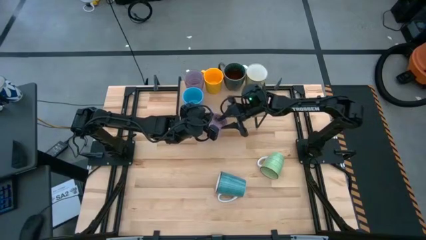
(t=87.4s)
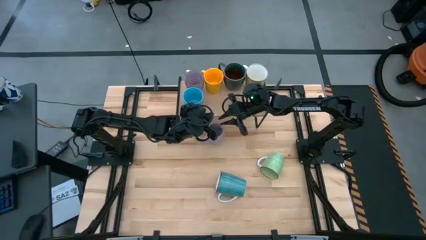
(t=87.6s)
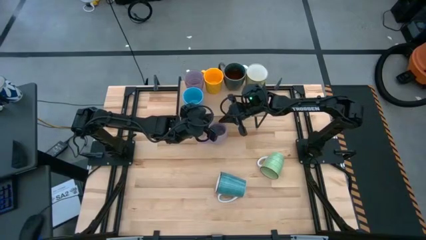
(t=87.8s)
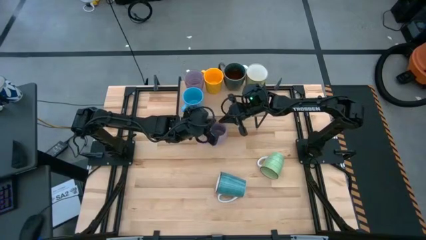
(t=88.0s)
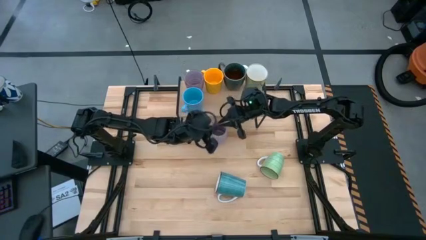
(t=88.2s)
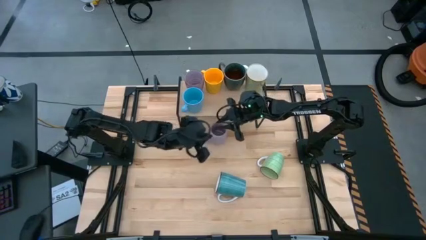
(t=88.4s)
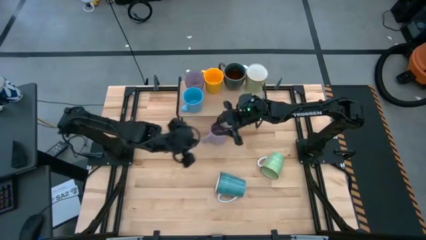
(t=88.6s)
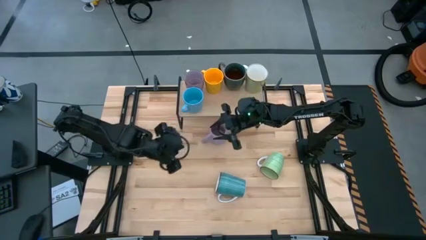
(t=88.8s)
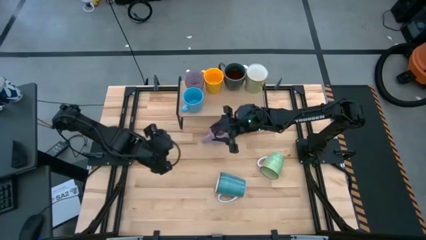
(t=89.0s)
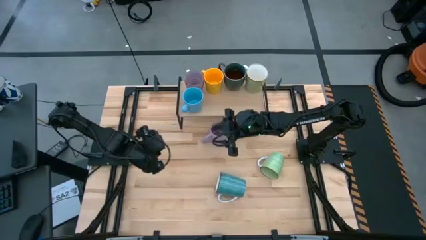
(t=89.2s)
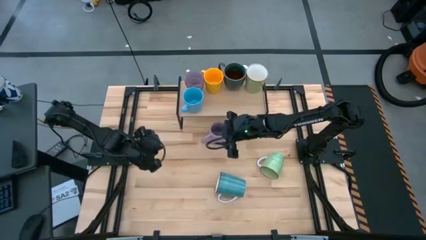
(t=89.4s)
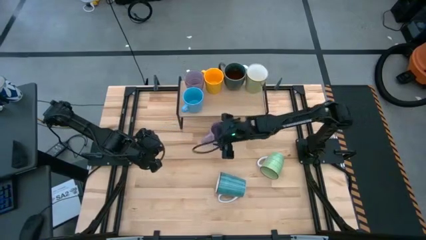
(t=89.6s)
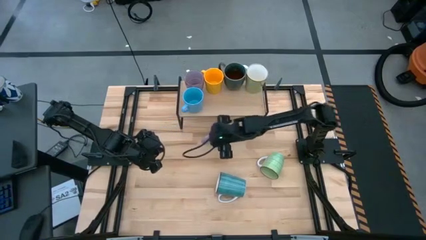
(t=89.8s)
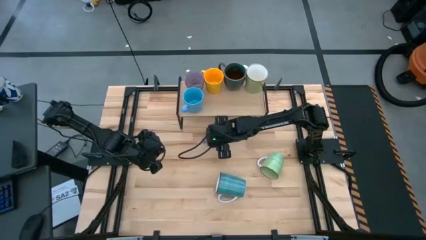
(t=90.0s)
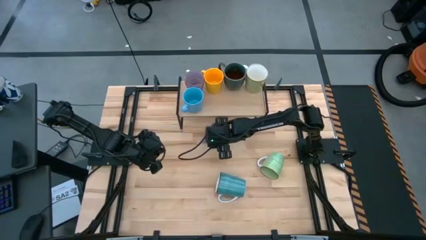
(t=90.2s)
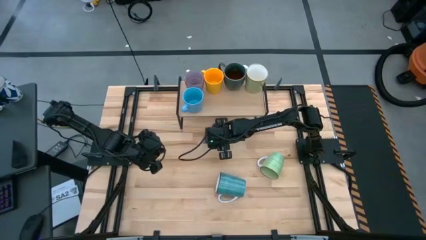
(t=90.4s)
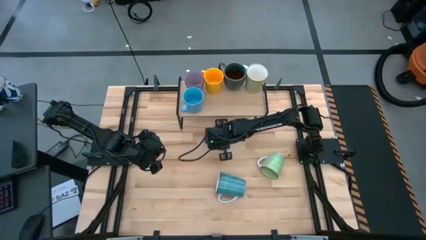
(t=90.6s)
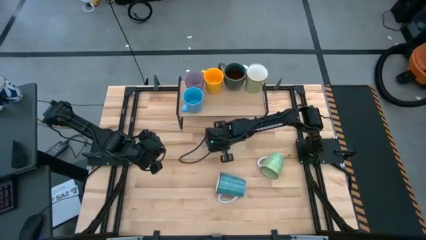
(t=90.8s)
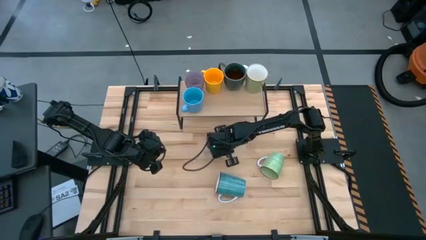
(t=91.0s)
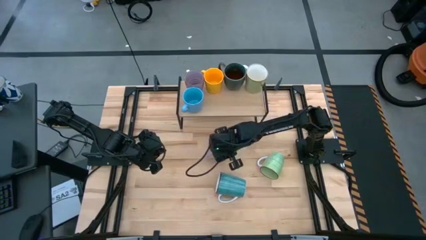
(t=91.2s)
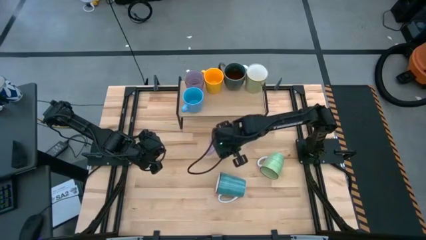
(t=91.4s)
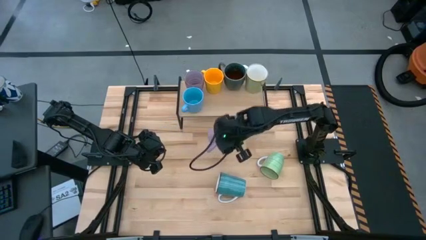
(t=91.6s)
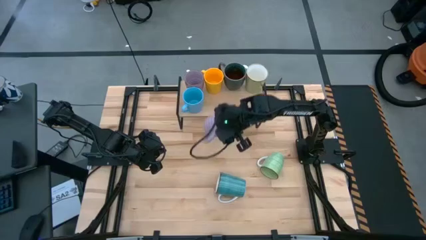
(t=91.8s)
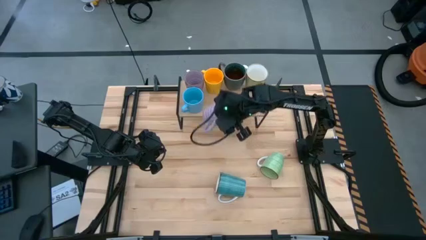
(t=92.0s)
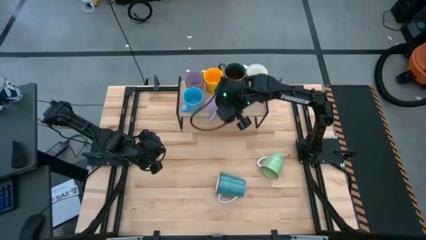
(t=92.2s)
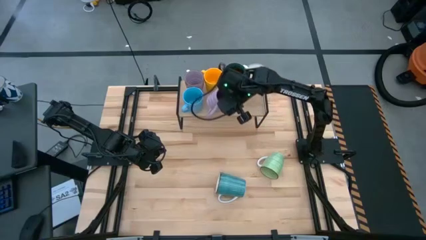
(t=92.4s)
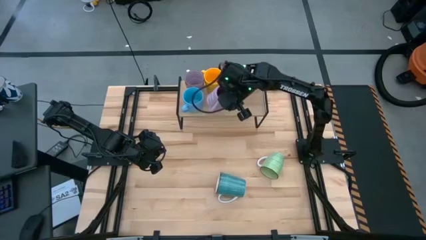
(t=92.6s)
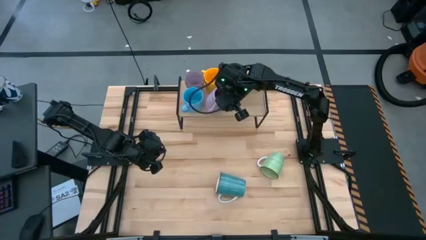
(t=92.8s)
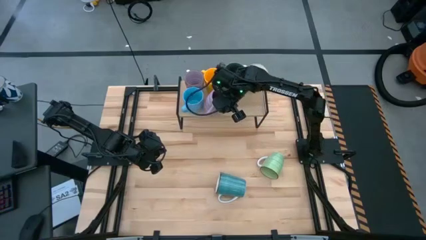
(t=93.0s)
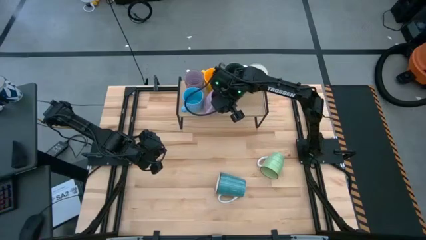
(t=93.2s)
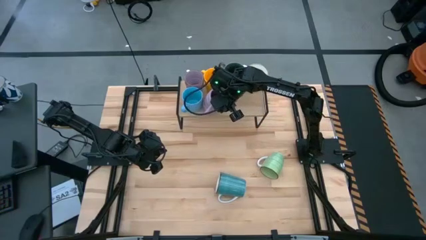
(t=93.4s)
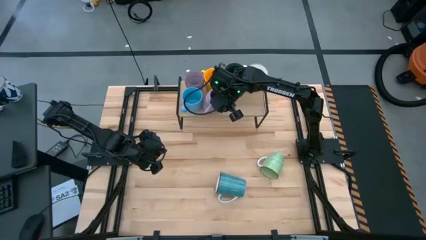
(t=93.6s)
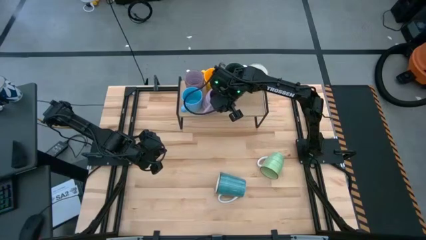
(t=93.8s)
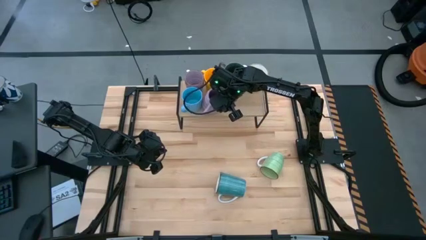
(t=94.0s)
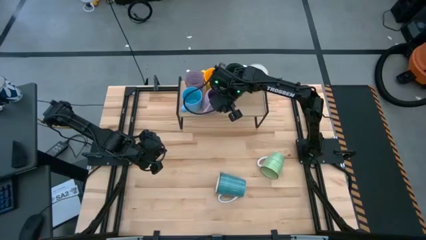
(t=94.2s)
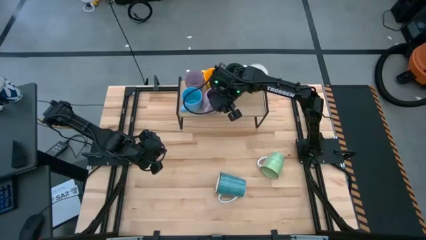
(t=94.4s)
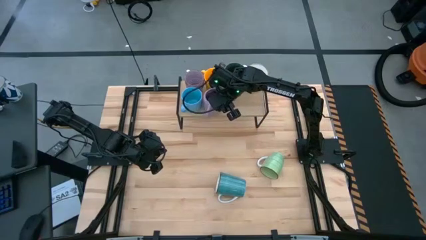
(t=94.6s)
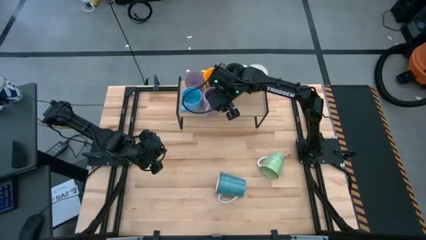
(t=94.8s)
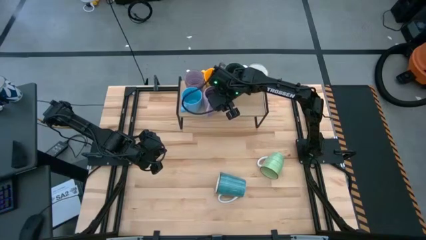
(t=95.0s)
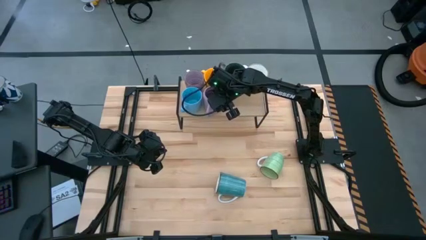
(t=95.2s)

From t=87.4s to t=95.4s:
Task: Place coffee mugs
Put the violet mug on the shelf
